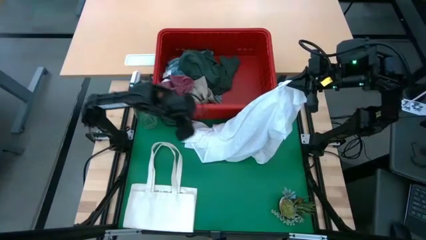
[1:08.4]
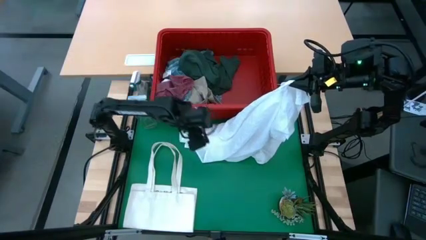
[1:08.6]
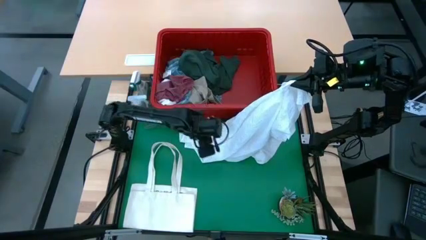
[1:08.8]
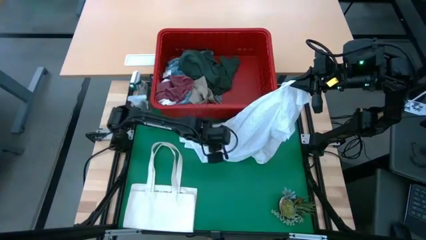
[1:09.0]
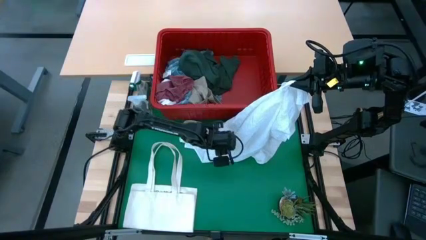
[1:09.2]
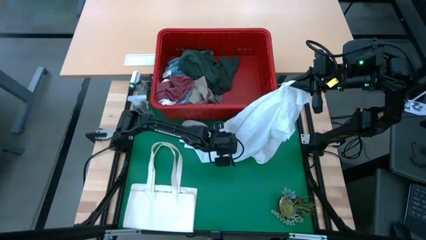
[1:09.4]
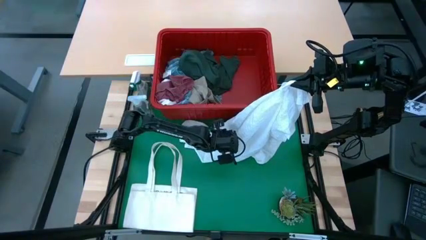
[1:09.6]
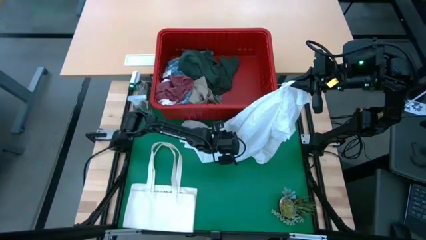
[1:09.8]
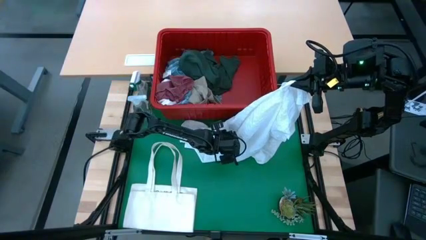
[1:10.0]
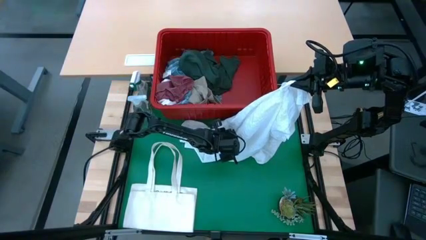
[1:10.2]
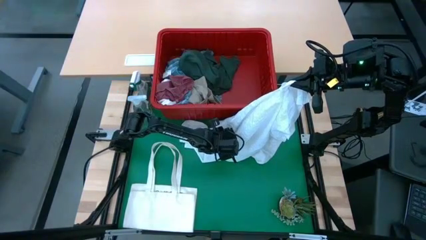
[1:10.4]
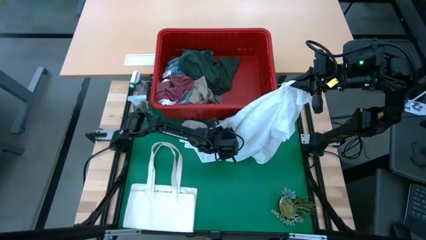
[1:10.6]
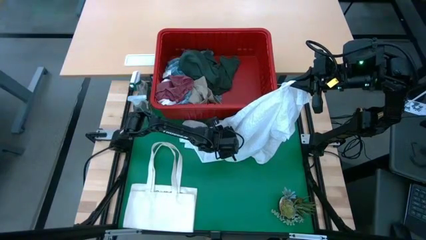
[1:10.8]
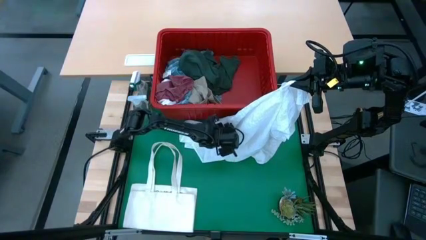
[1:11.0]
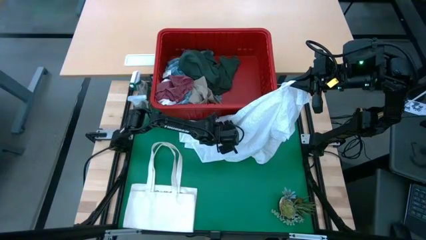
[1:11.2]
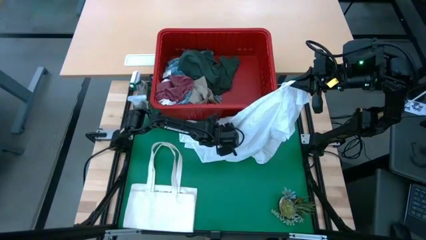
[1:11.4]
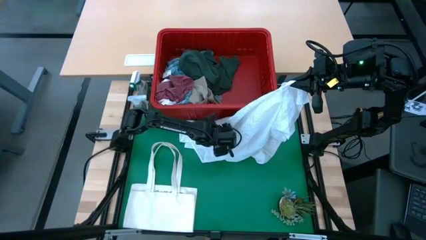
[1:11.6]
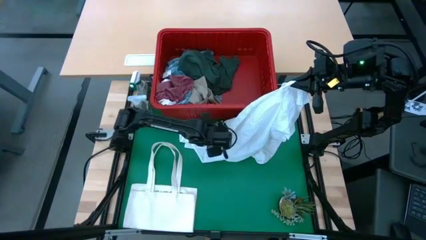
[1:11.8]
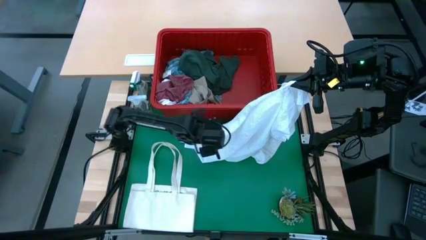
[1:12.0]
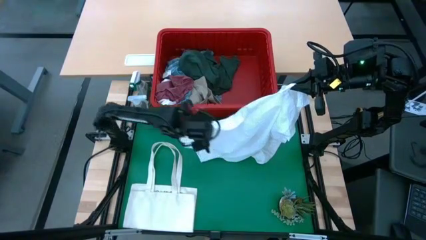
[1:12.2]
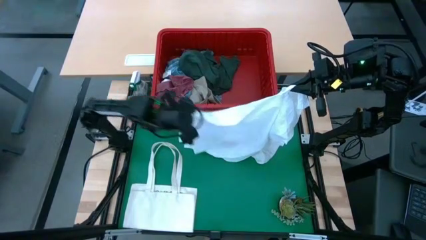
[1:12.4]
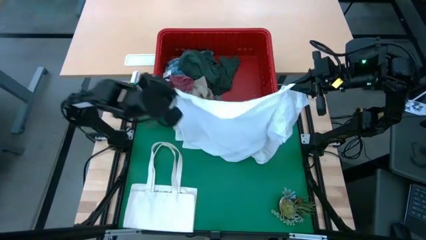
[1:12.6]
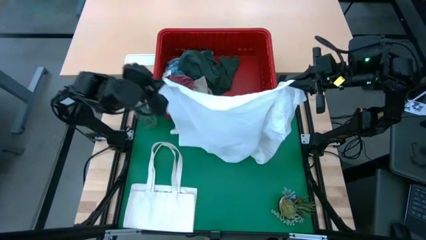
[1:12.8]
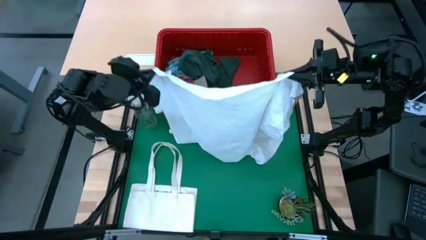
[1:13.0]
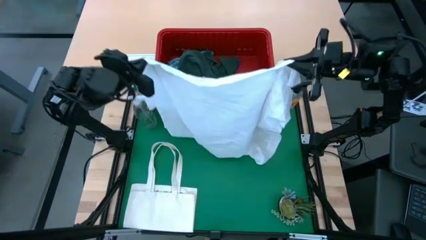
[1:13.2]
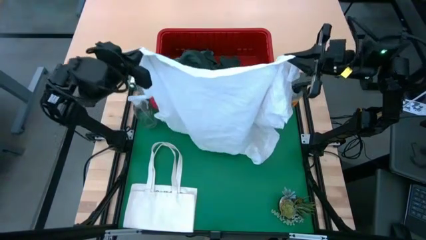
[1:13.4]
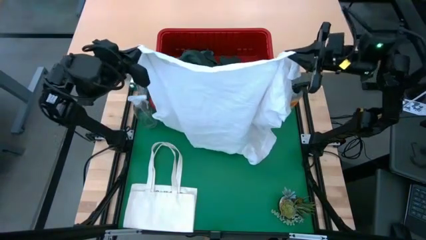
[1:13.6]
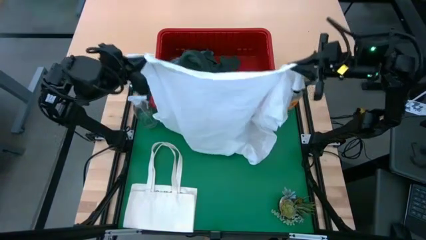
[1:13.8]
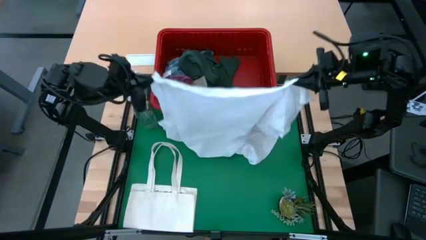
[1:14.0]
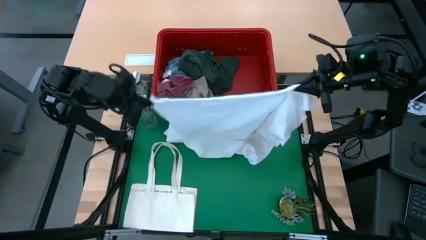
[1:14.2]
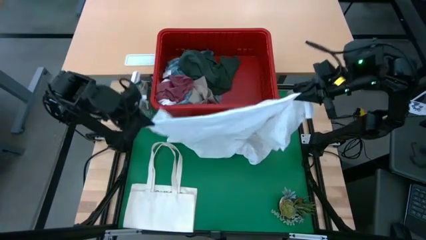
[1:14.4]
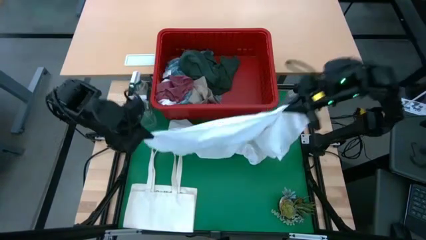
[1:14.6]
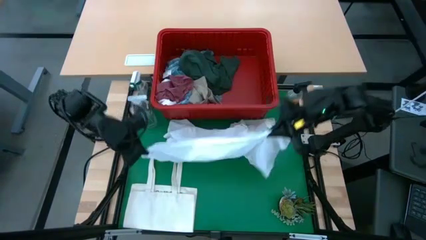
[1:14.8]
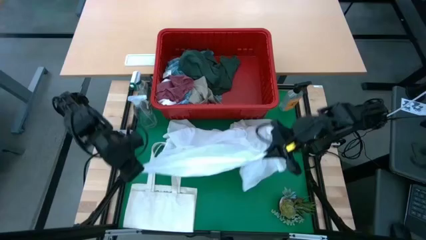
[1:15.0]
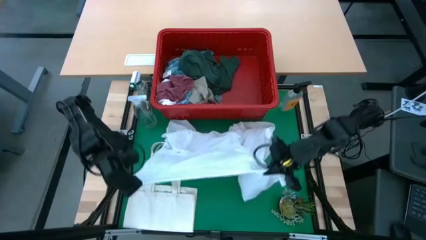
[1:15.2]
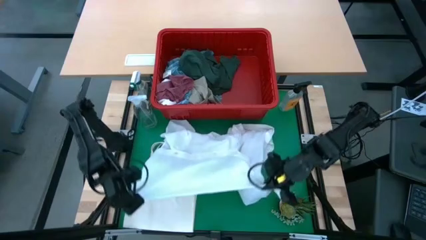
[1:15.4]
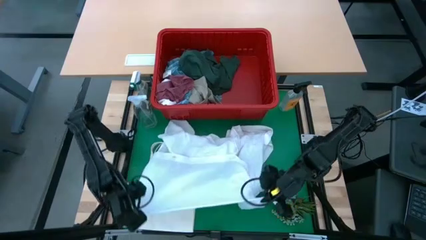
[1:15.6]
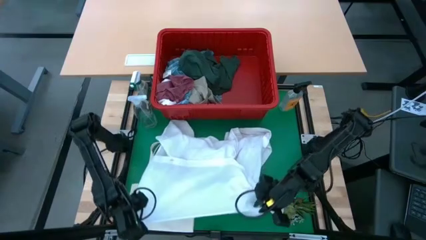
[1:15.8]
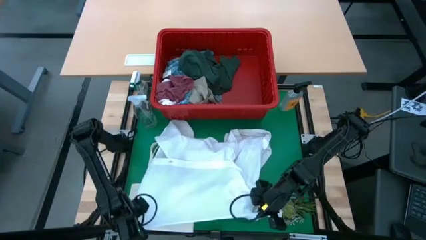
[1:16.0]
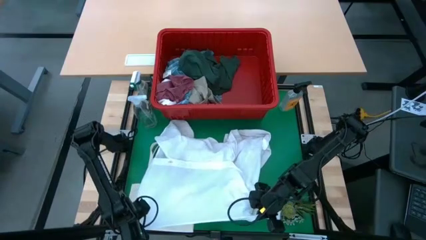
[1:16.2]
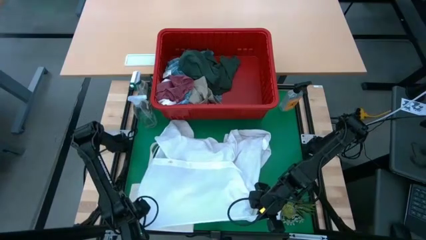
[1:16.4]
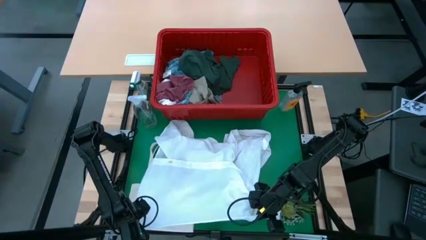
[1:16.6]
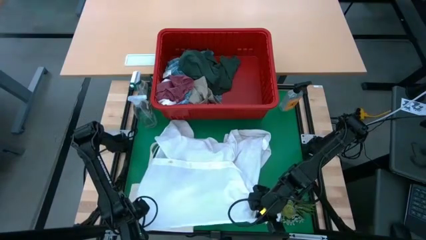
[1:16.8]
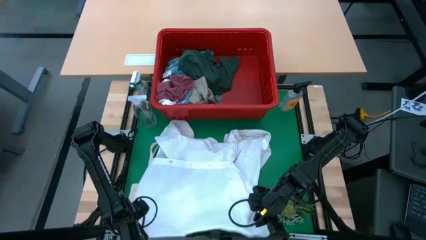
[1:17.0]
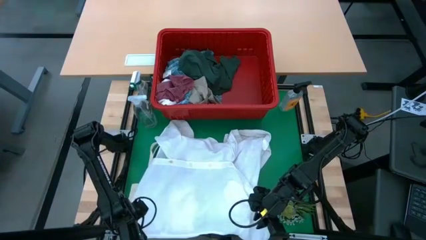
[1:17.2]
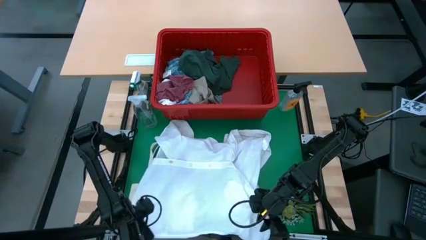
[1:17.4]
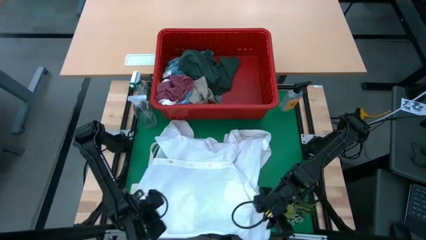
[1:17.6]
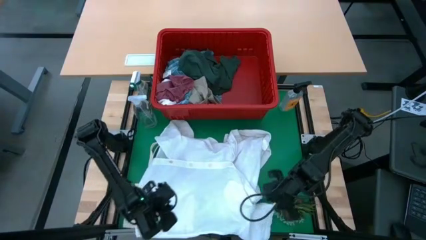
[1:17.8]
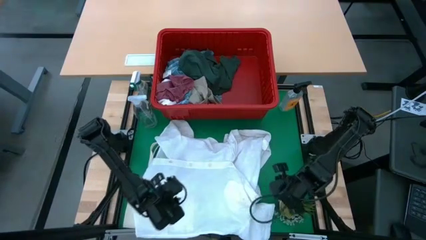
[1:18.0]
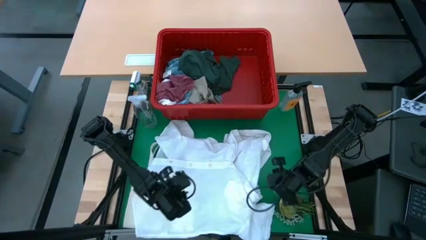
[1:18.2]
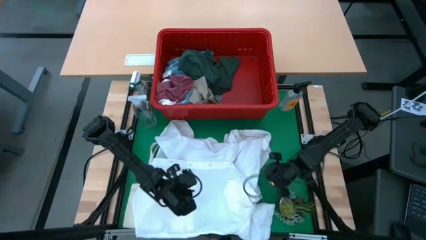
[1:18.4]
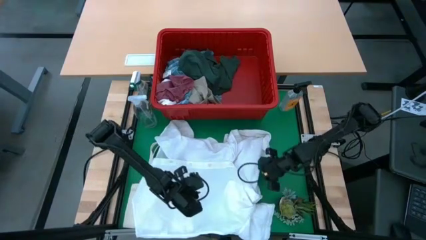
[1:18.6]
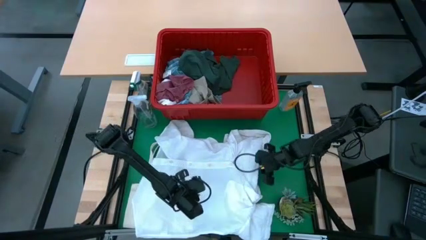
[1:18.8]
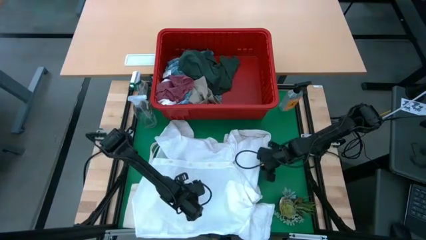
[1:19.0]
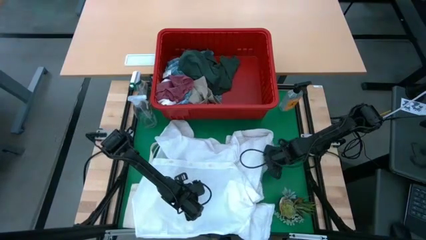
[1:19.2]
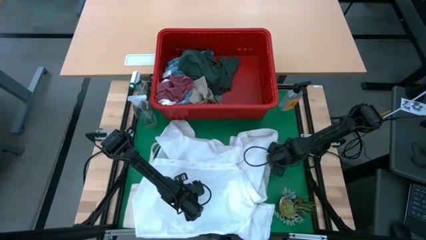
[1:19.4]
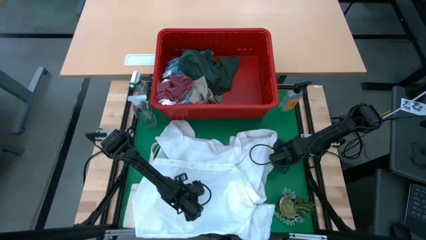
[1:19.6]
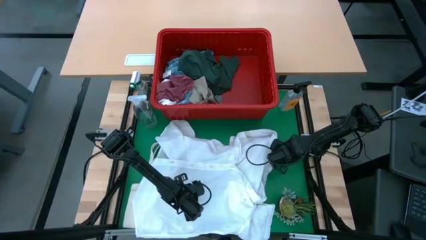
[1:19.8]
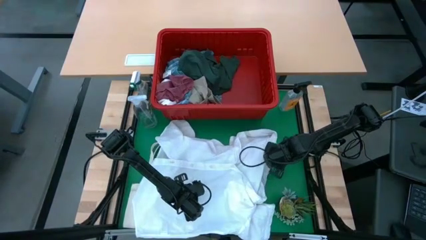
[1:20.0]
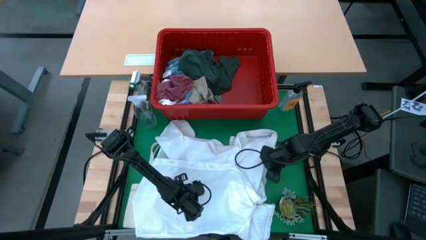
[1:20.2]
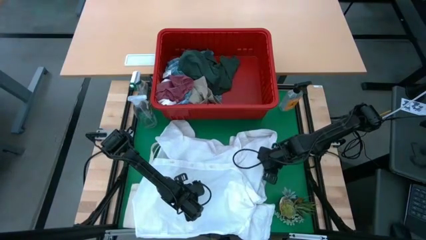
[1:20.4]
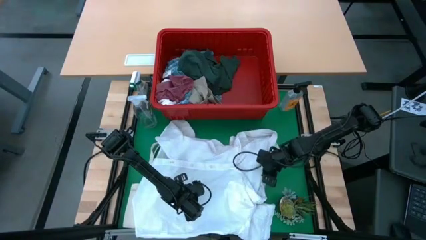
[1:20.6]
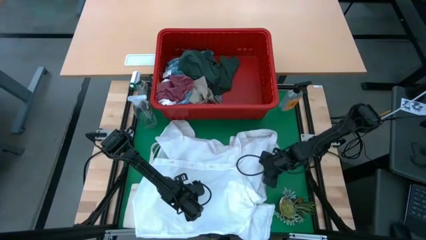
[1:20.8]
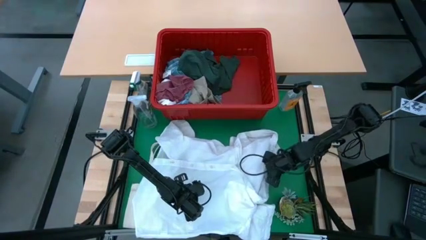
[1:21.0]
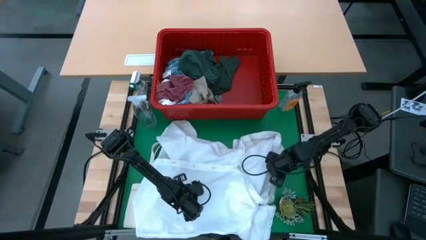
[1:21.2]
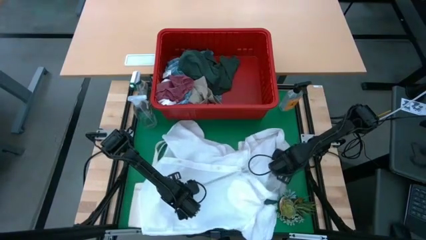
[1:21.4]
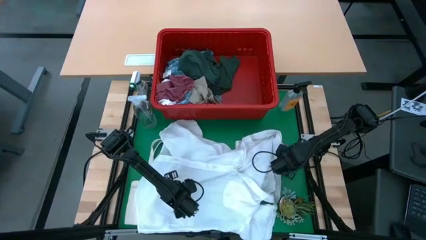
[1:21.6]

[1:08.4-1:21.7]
Task: Fold Laundry from Bin
Fold the white polo shirt
